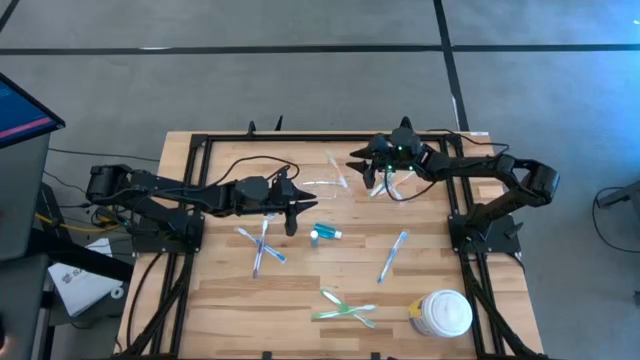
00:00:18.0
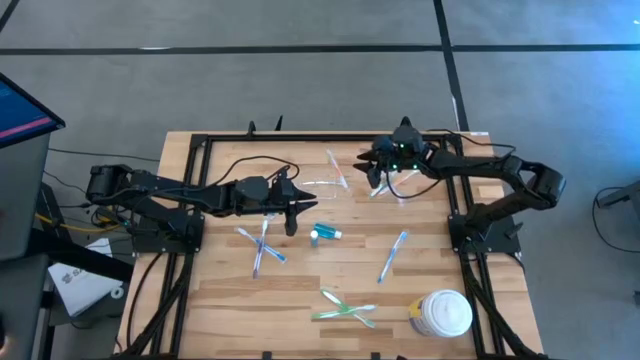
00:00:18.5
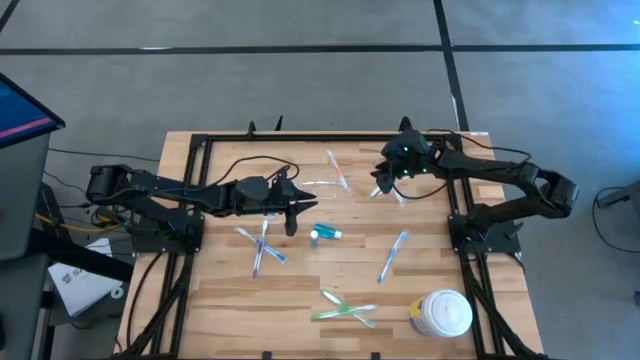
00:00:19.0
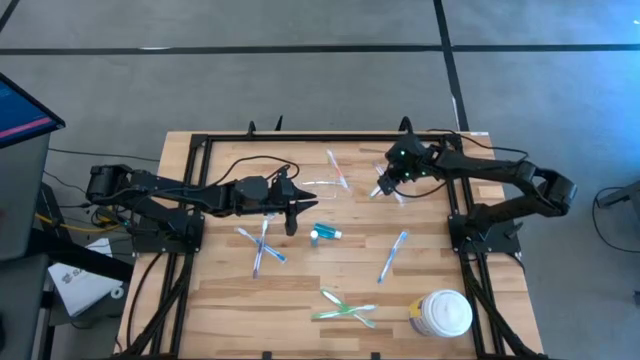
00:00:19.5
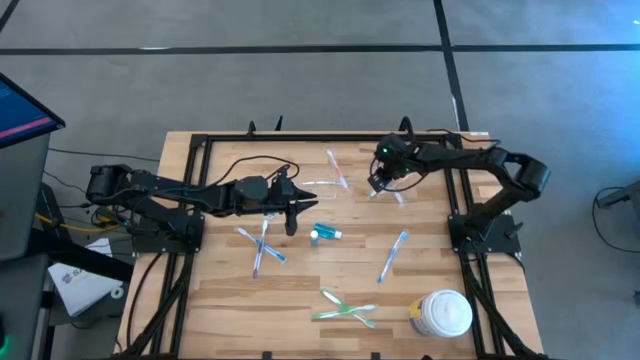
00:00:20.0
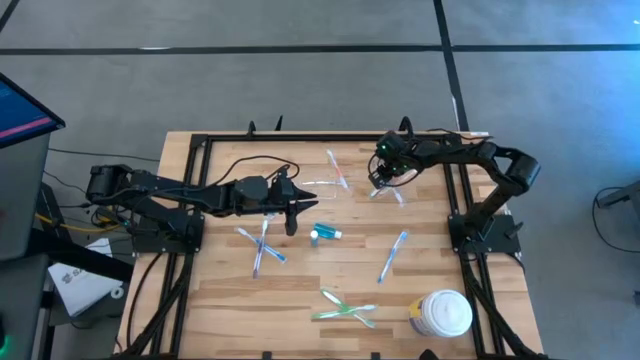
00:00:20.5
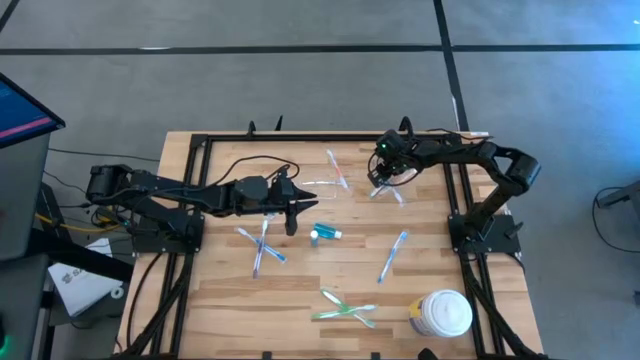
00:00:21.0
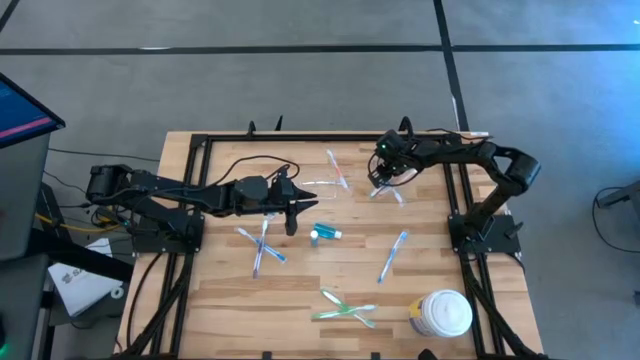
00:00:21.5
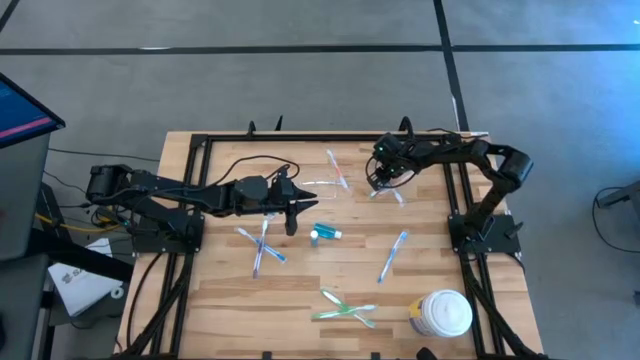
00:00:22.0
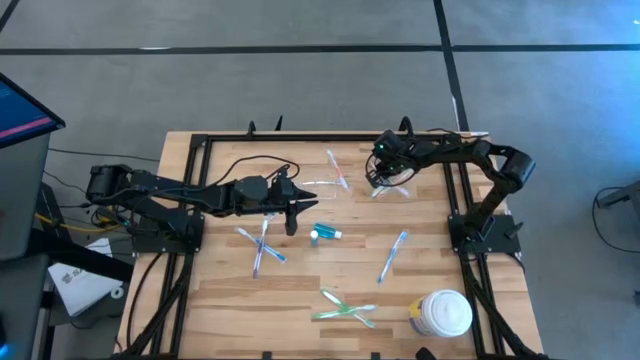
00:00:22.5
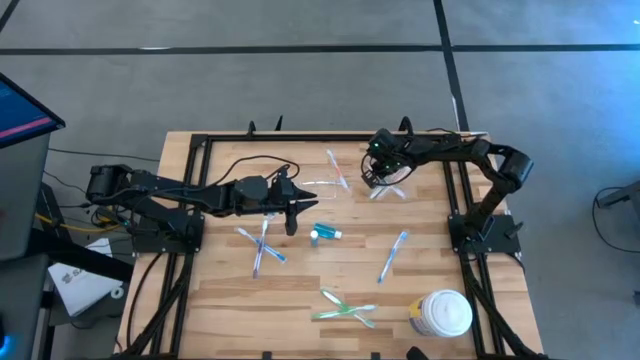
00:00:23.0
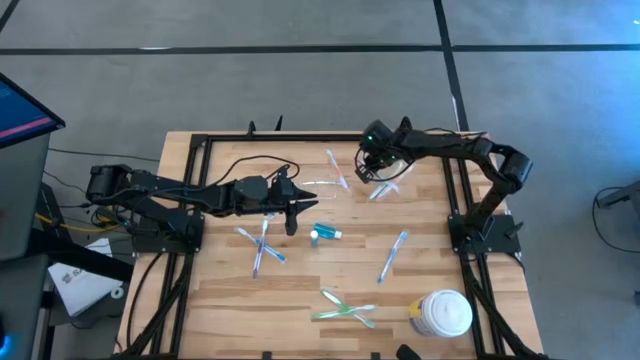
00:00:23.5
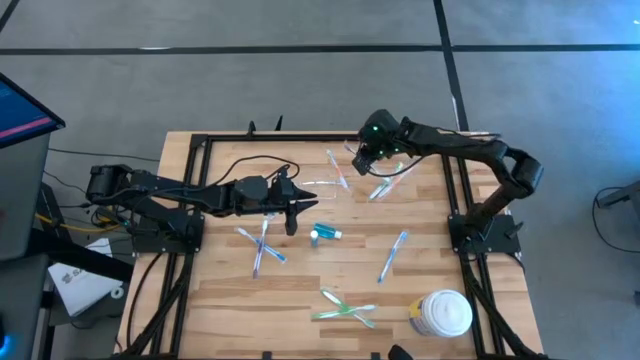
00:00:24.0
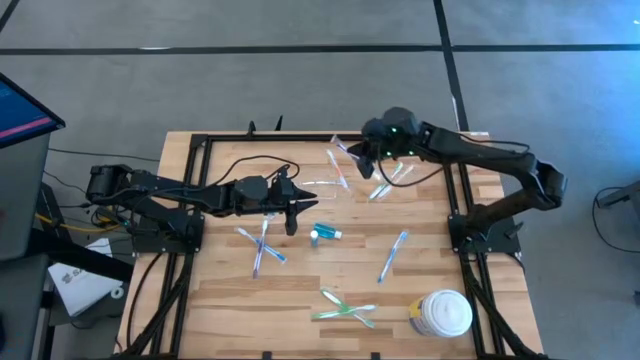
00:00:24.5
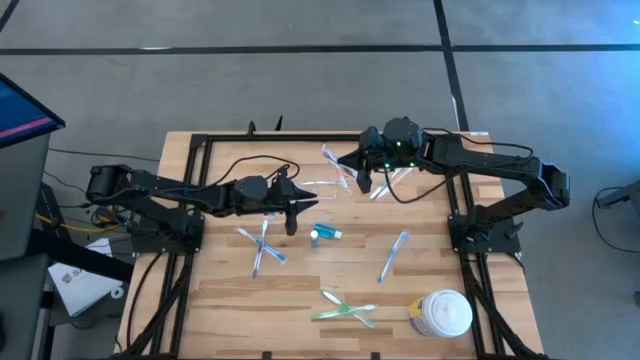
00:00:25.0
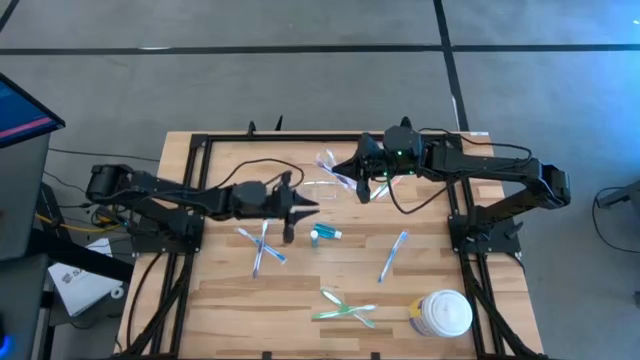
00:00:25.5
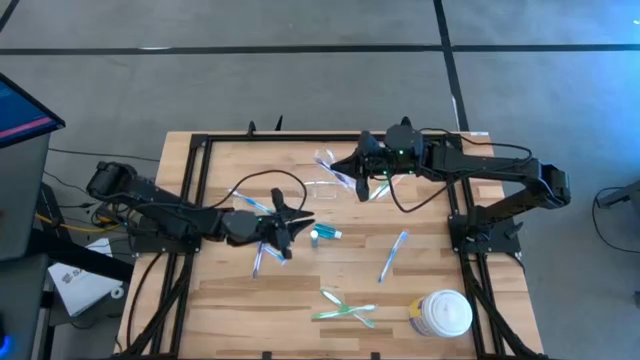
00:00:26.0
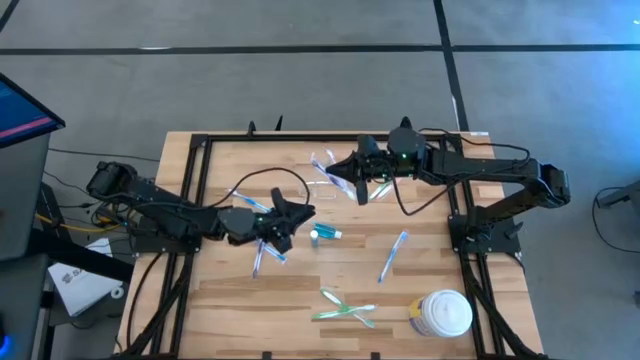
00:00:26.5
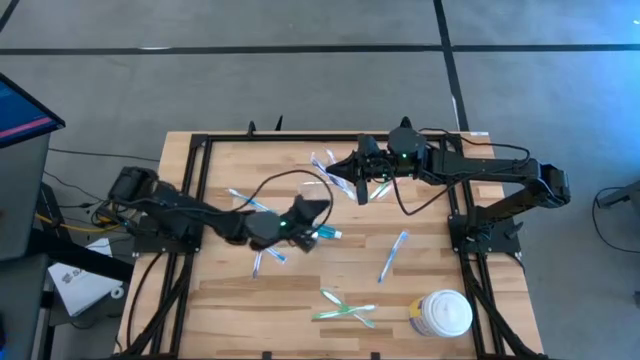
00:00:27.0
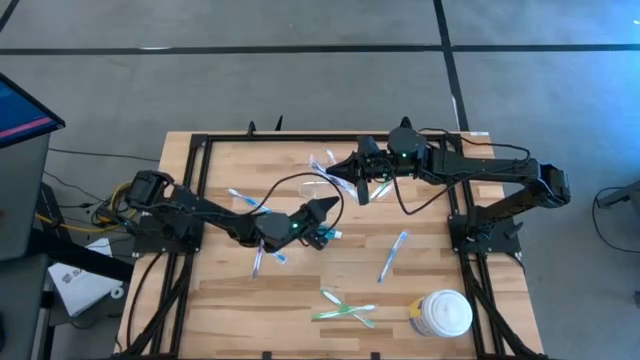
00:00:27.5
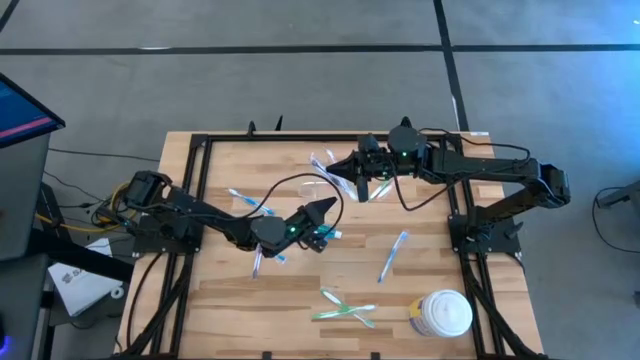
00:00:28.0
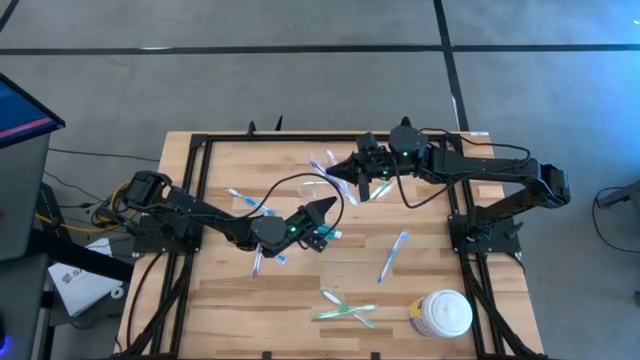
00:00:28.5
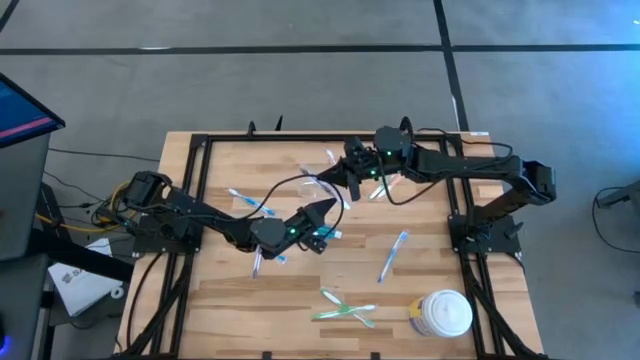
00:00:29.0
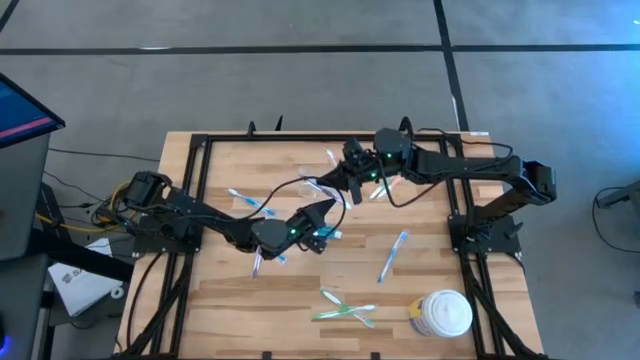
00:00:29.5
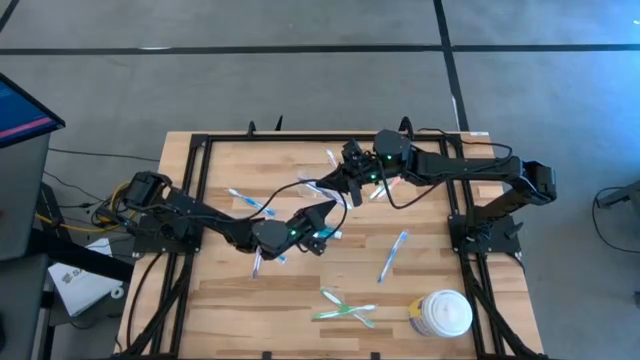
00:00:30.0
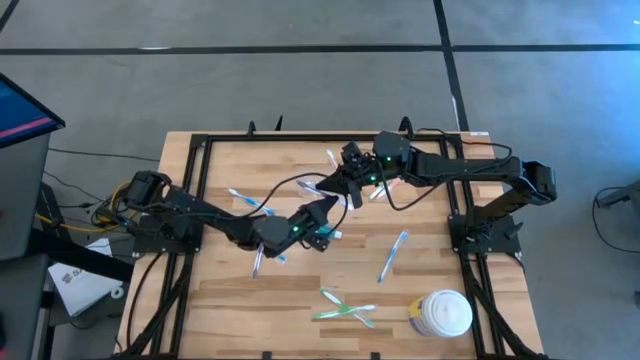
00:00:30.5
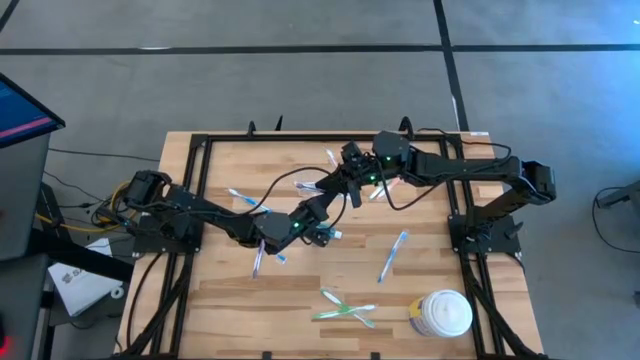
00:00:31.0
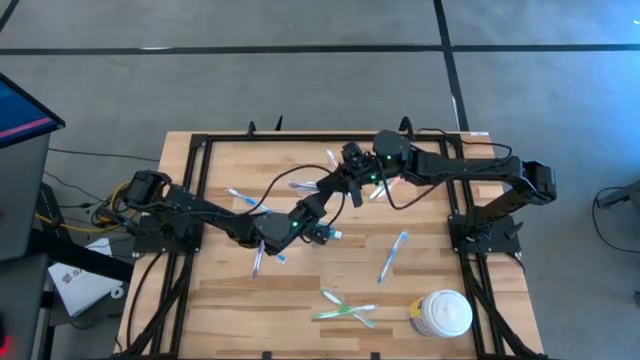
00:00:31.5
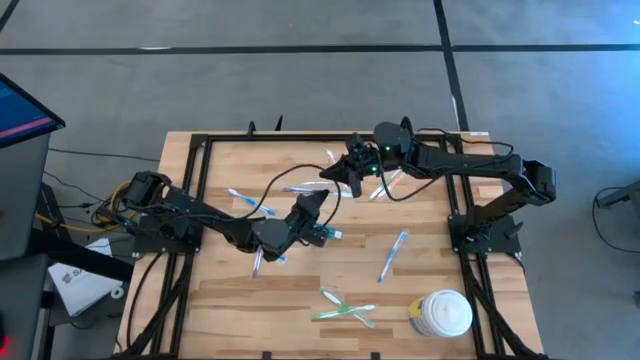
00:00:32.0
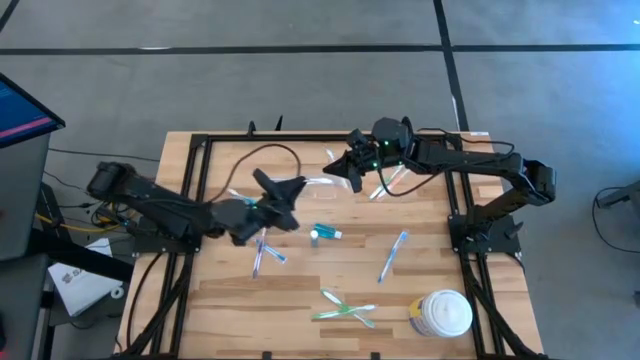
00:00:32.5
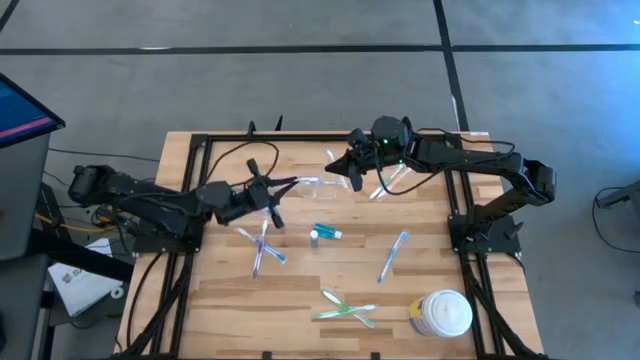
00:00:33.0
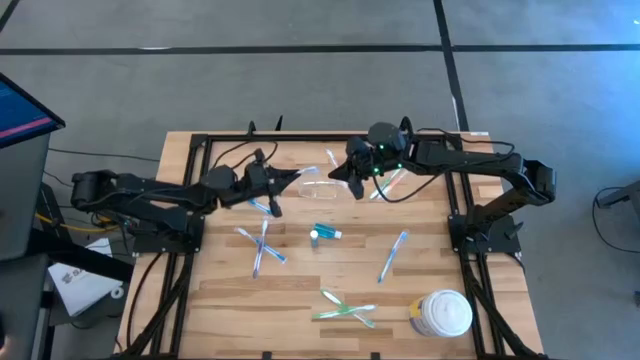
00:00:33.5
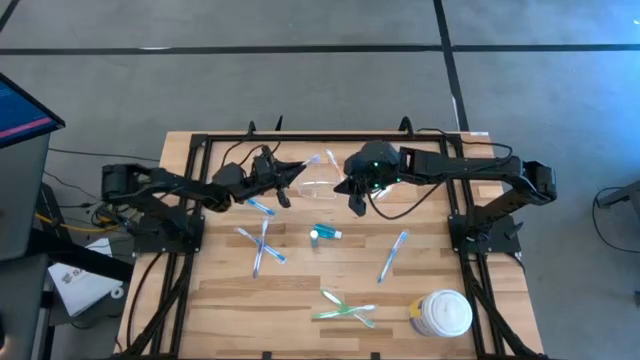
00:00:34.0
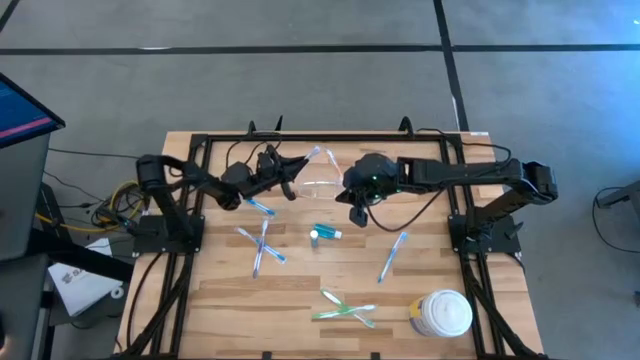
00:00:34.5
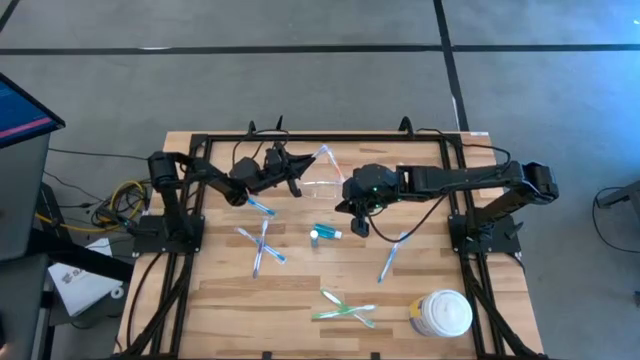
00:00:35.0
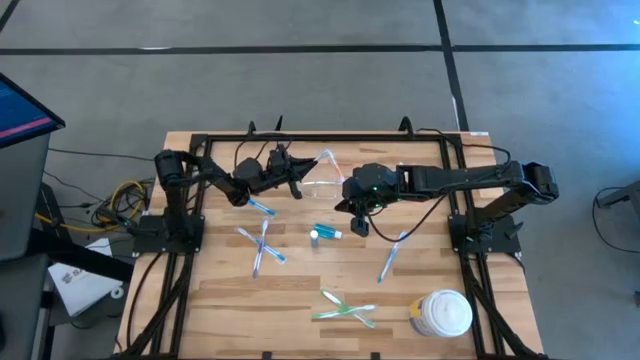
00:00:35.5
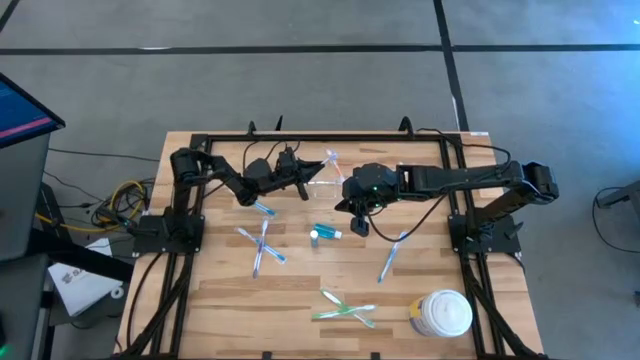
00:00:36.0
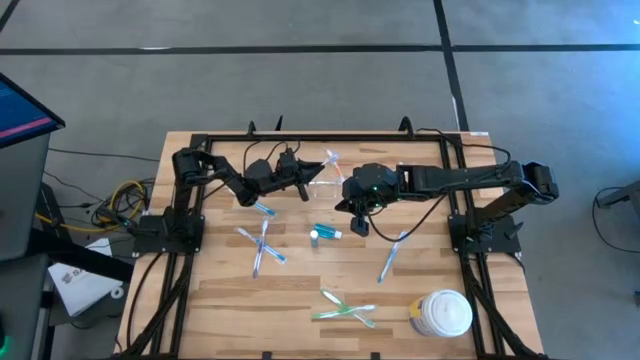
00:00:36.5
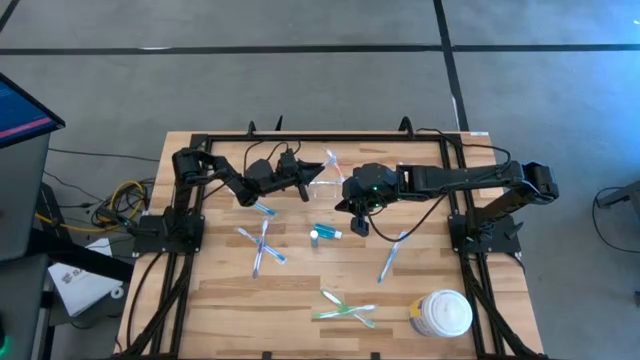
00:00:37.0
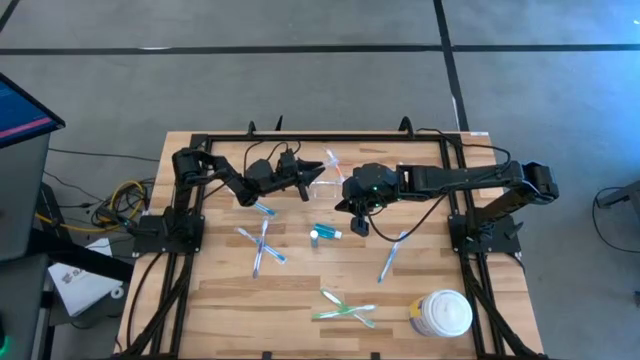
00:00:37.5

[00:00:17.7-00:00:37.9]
Task: Pick & Place toothbrushing station
Put the top purple toothbrush into the transparent organizer
